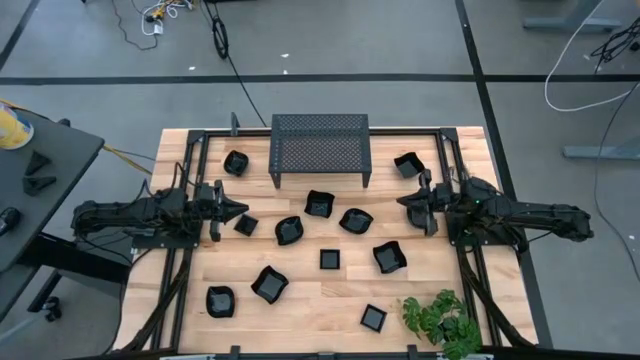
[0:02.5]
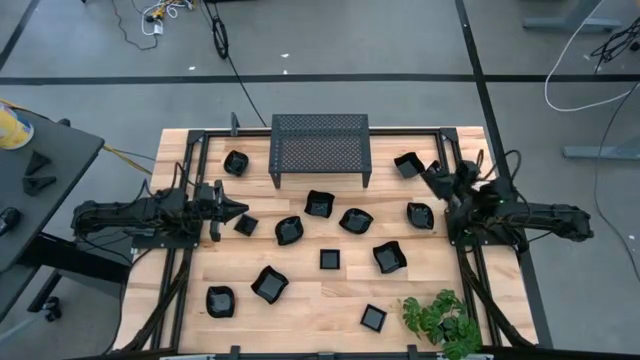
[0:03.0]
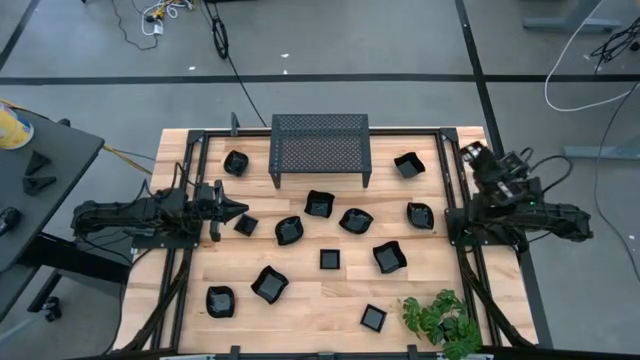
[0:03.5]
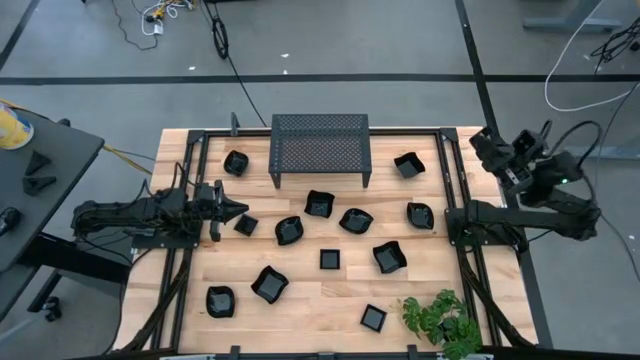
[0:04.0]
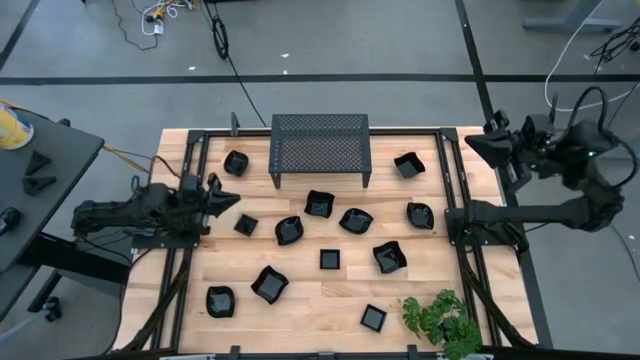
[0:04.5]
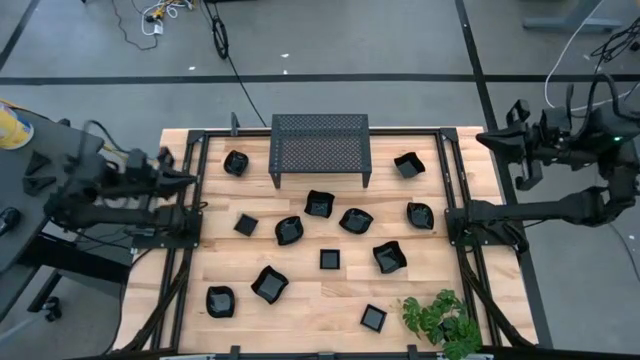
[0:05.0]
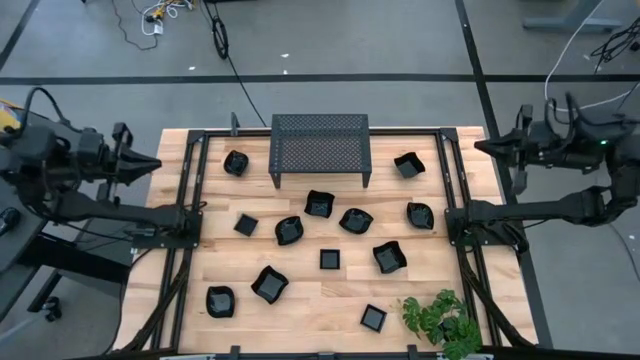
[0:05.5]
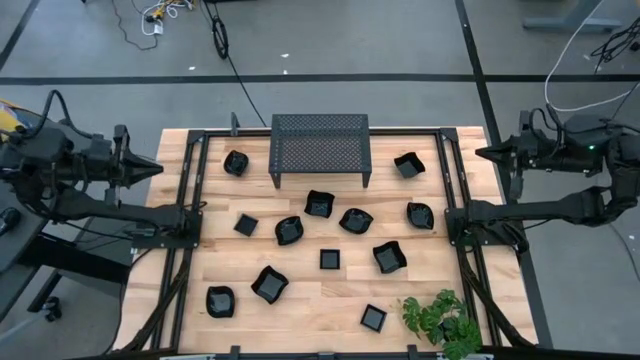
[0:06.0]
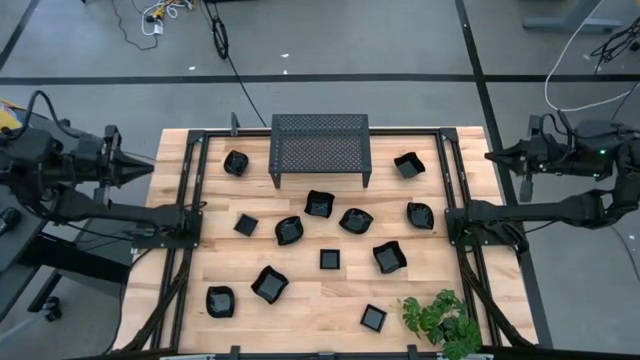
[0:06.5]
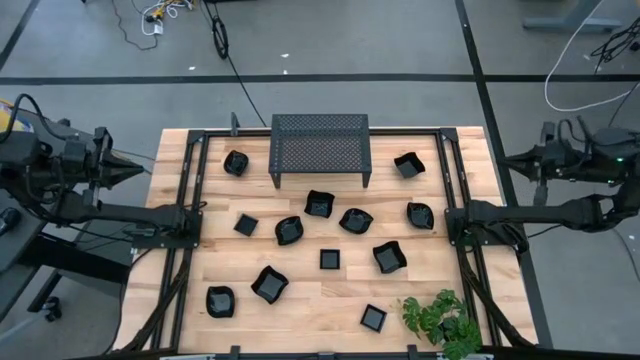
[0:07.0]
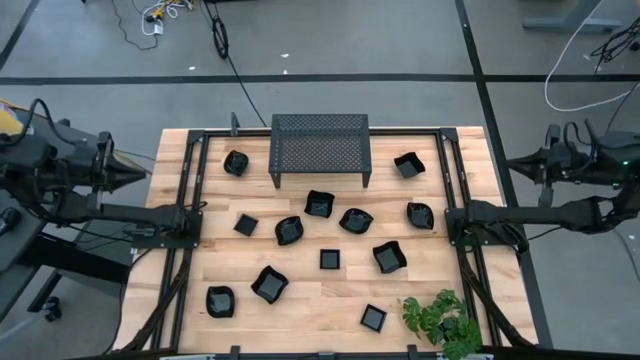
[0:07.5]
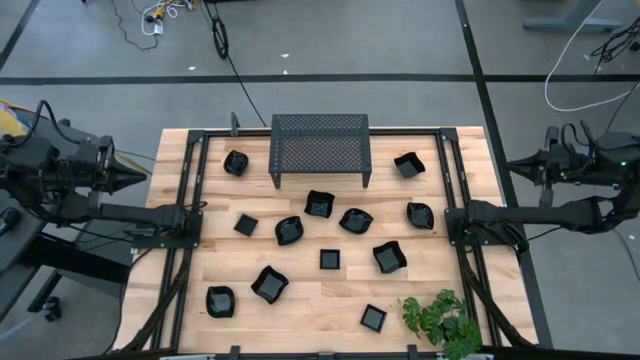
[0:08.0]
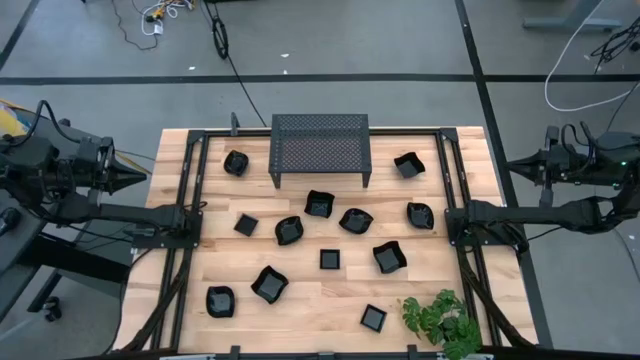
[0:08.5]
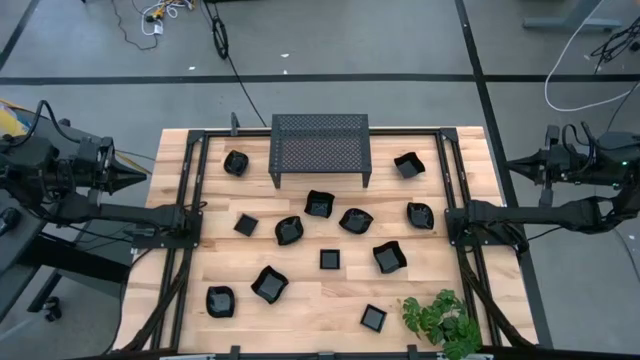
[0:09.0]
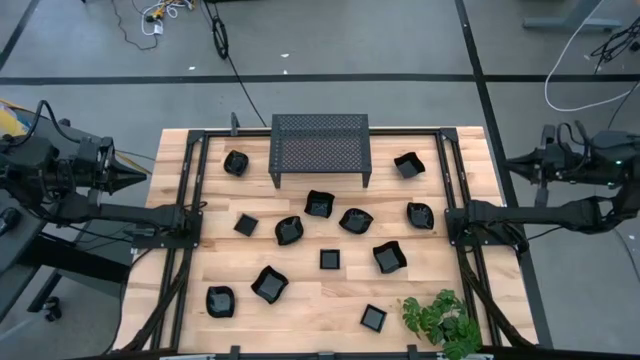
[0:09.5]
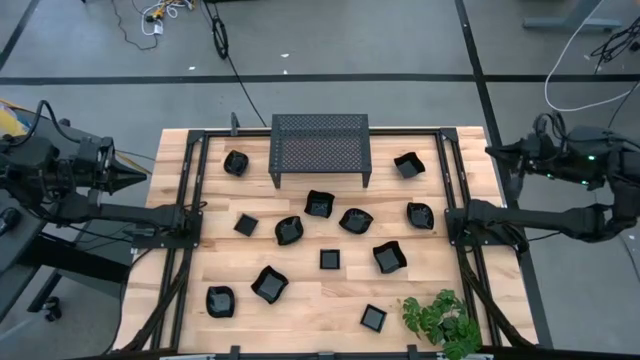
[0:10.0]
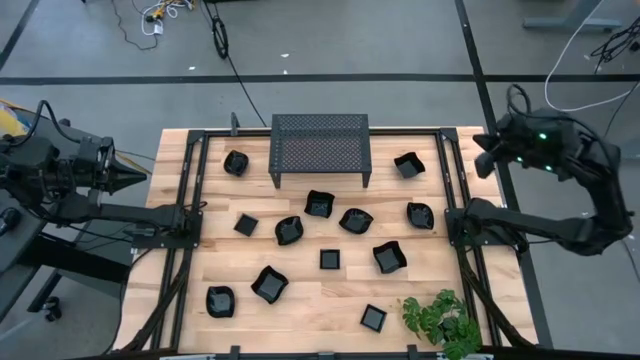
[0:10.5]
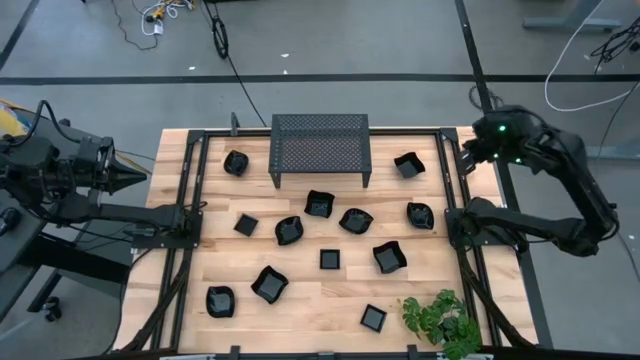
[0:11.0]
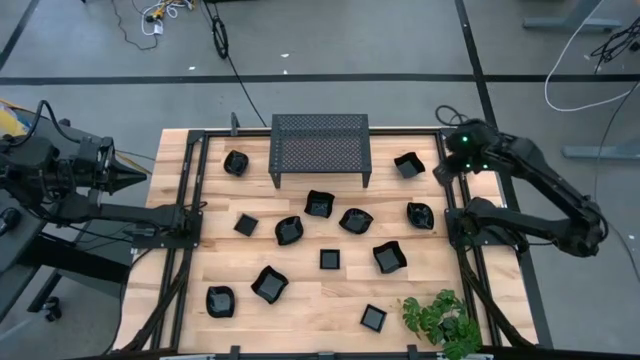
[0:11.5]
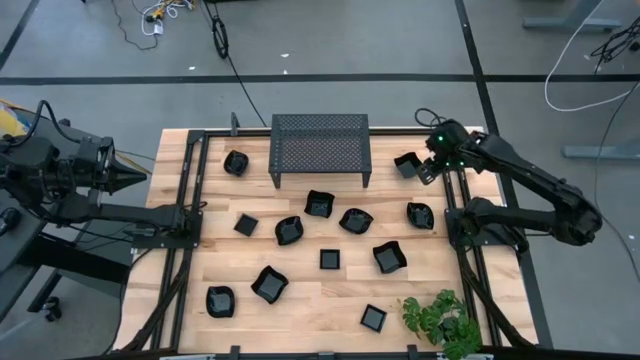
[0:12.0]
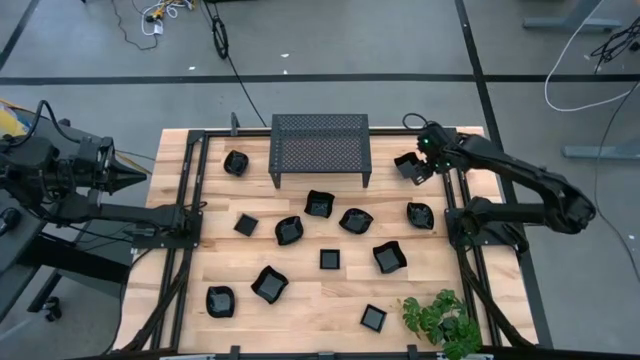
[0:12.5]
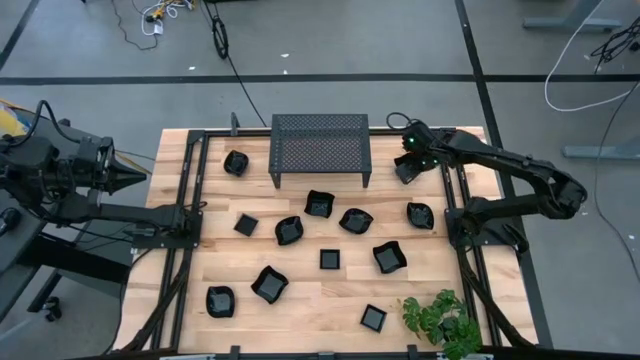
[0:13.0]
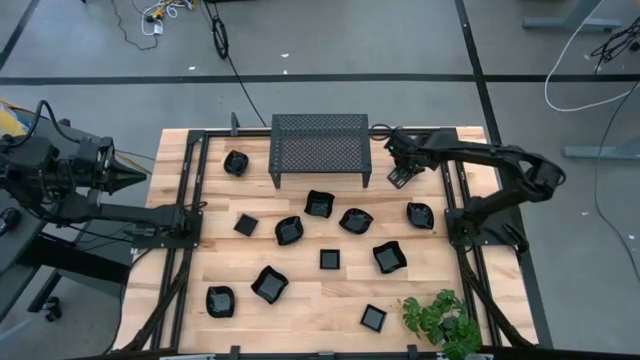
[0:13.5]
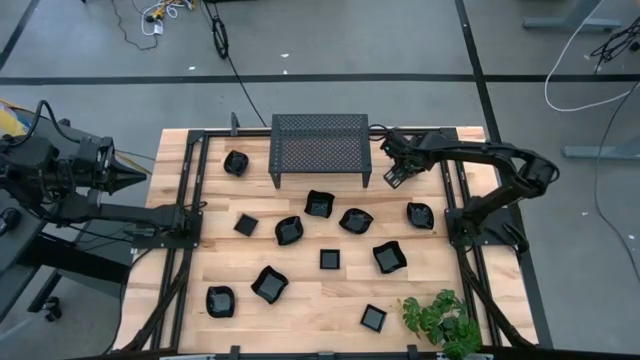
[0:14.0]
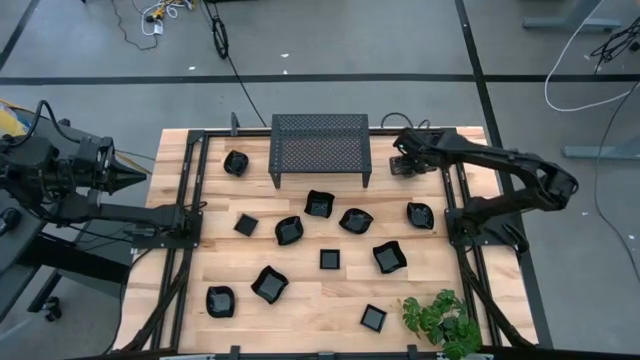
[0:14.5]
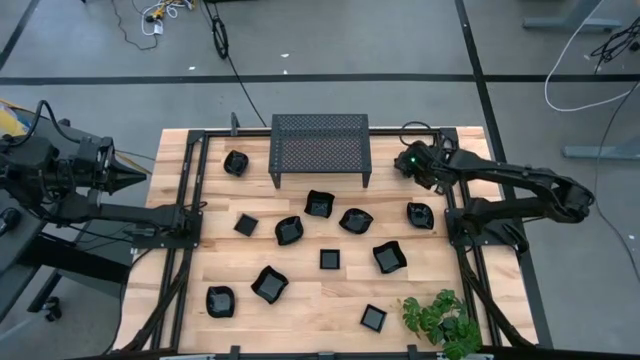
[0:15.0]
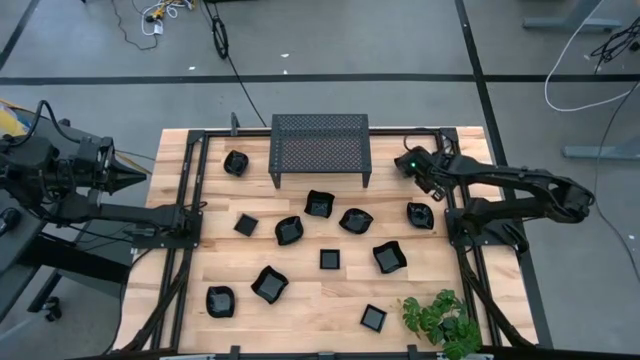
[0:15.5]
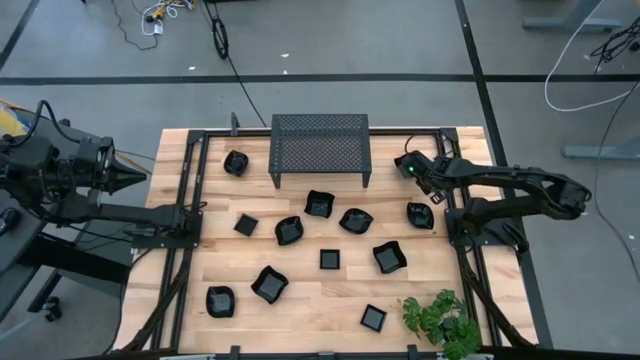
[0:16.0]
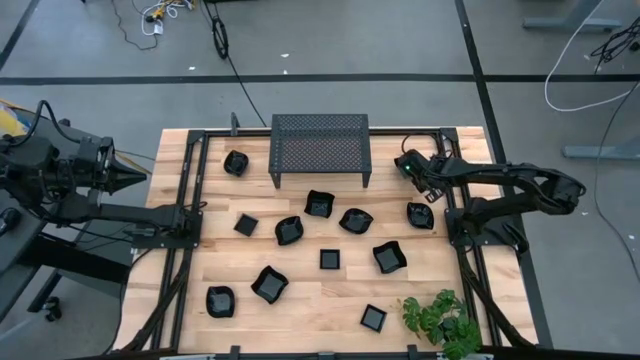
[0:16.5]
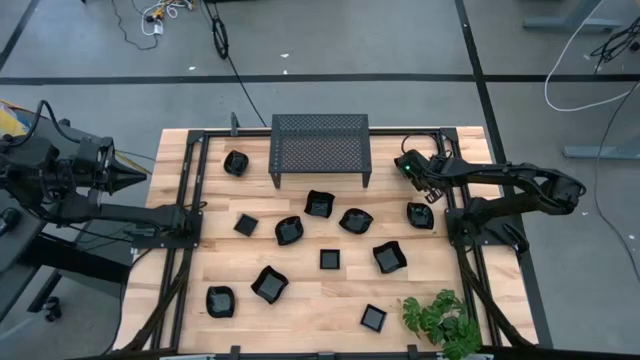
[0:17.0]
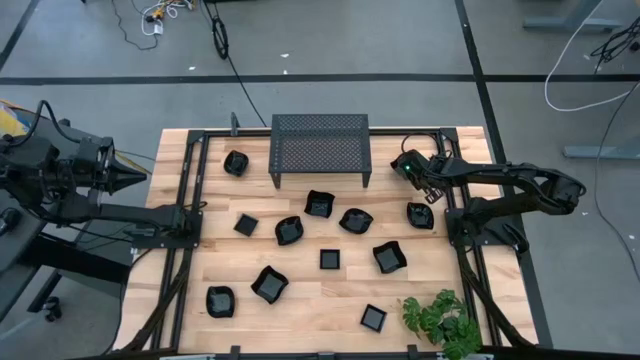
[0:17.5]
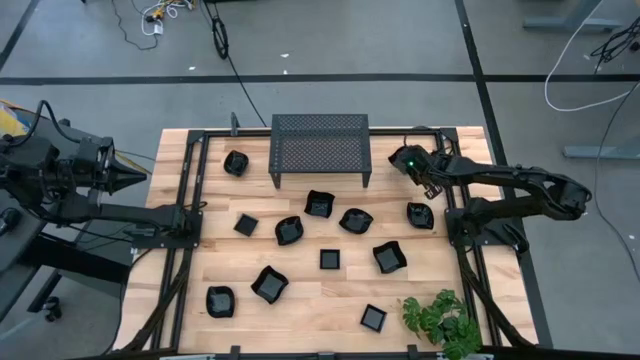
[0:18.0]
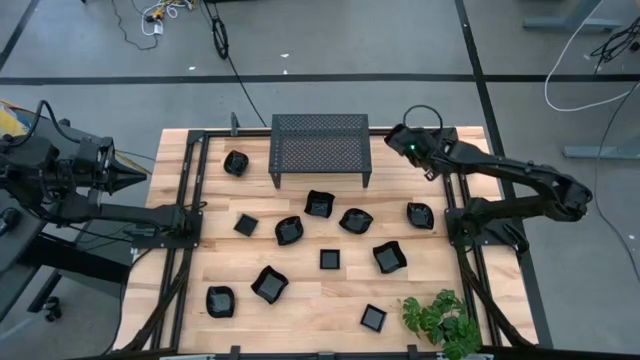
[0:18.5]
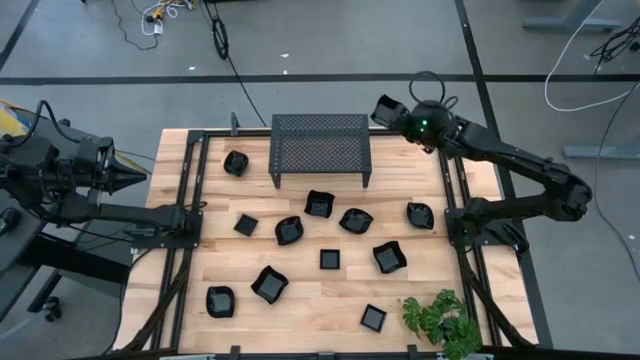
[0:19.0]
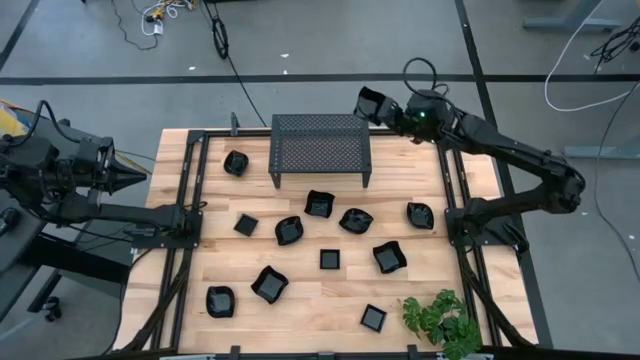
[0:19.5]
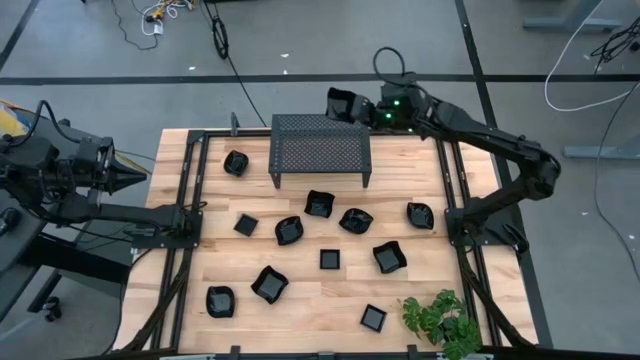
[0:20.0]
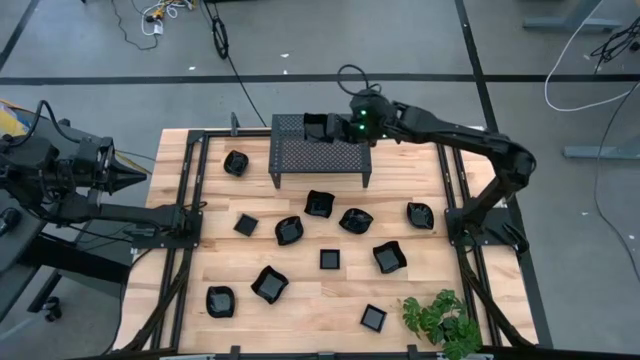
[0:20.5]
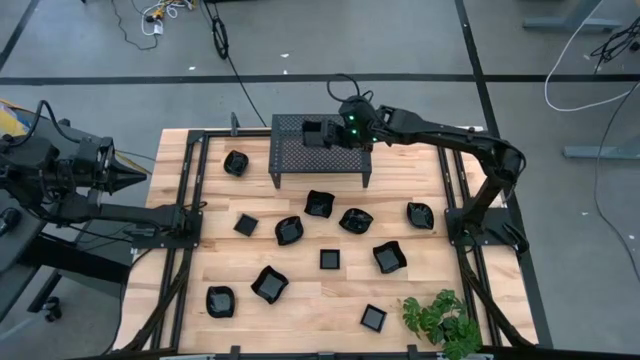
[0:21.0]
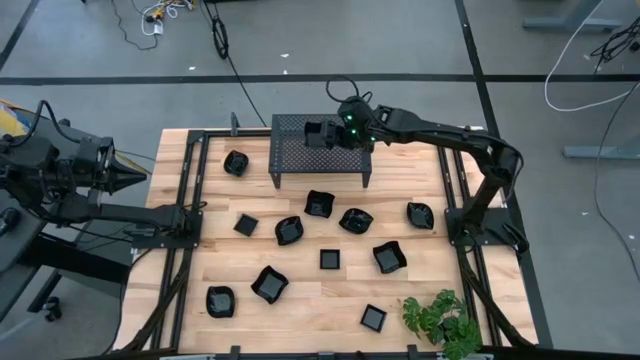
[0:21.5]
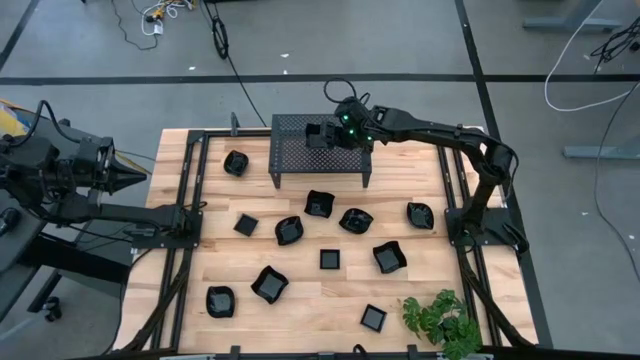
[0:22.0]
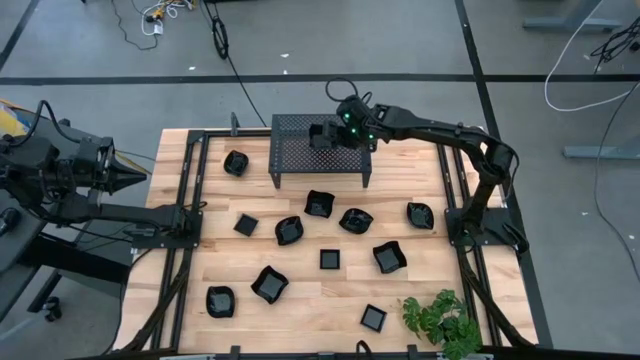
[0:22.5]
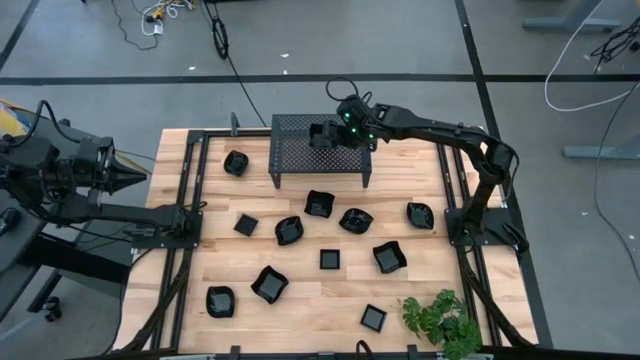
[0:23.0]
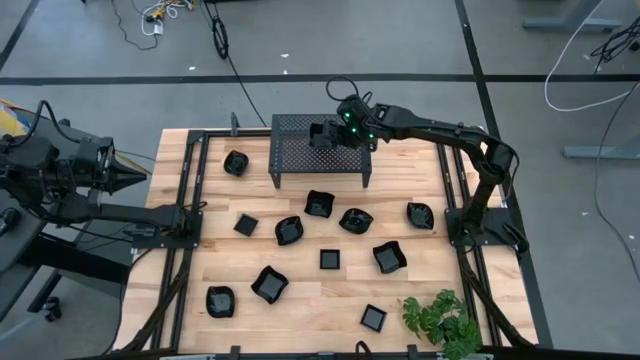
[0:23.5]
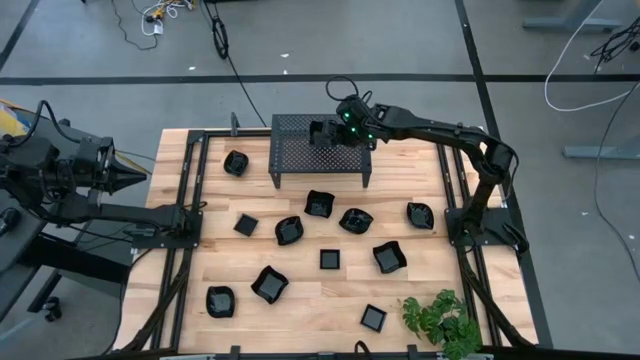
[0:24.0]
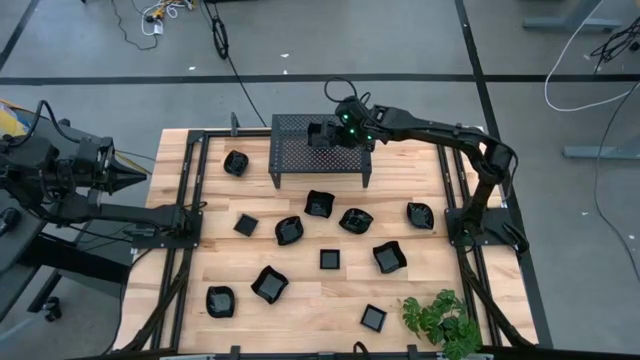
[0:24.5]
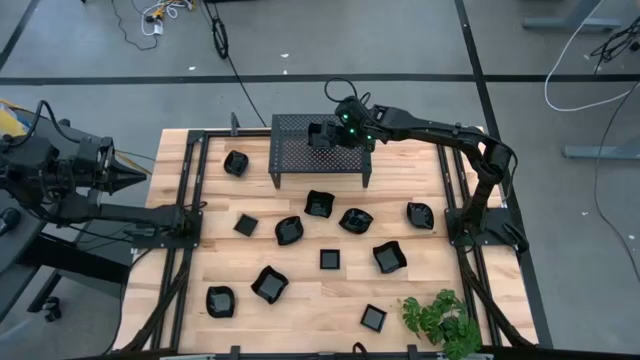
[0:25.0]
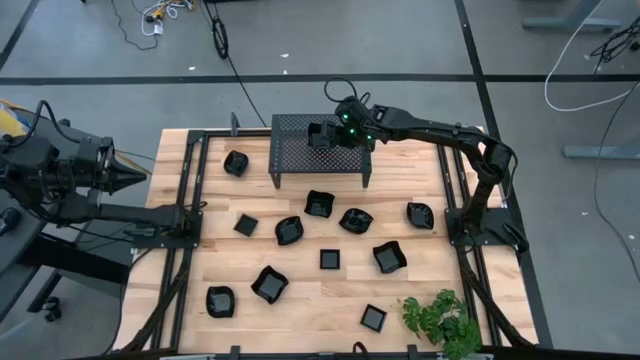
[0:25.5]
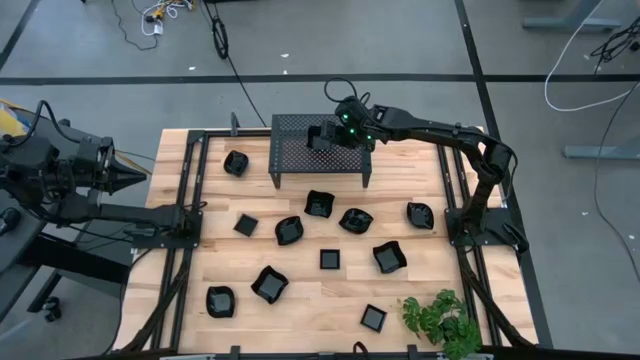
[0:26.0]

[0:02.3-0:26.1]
Task: Pick & Place Mini shaped plates
Put the distorted square plate on the shelf
